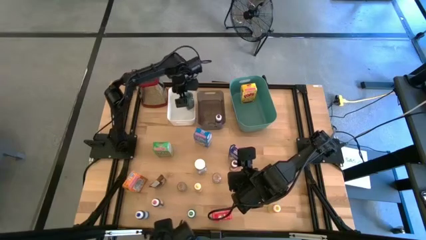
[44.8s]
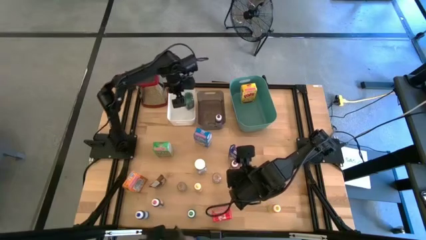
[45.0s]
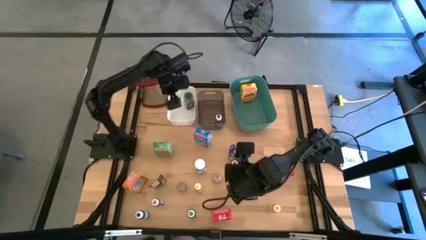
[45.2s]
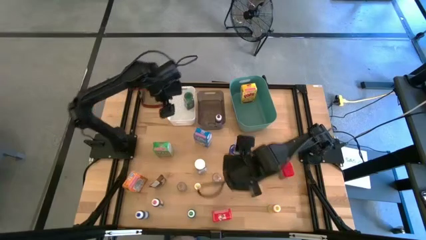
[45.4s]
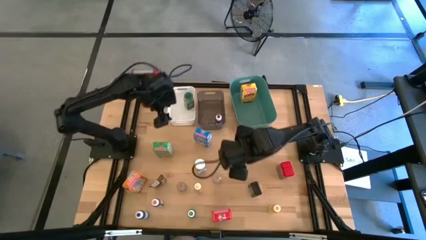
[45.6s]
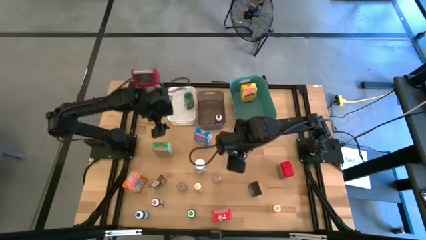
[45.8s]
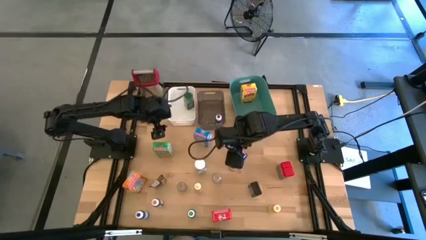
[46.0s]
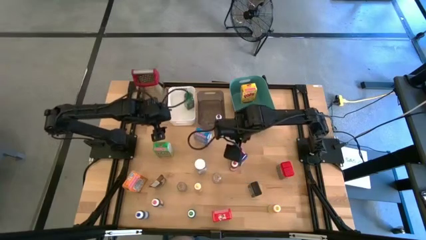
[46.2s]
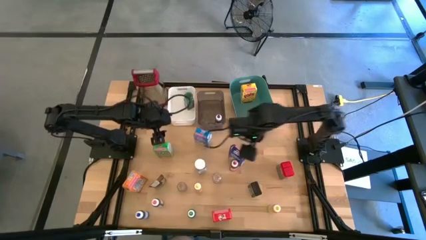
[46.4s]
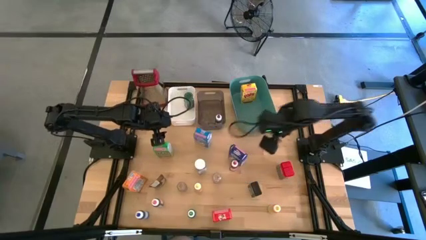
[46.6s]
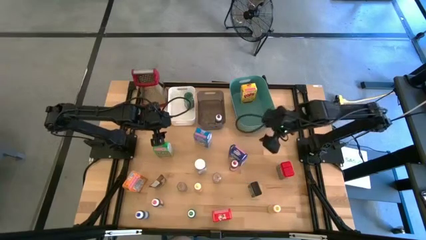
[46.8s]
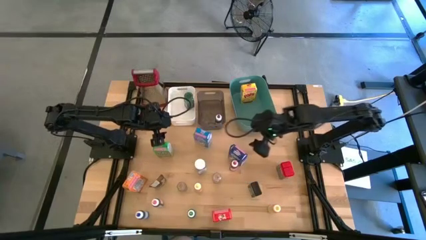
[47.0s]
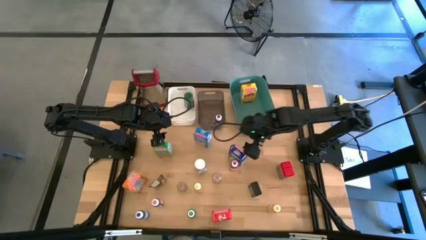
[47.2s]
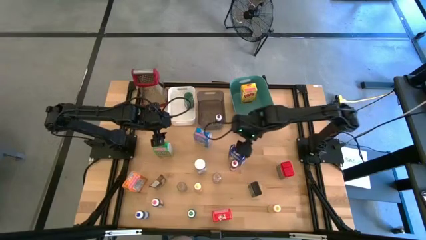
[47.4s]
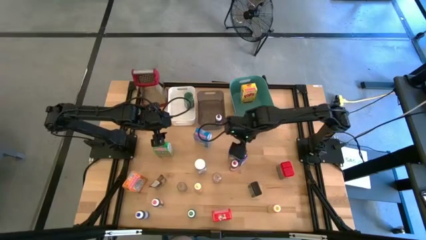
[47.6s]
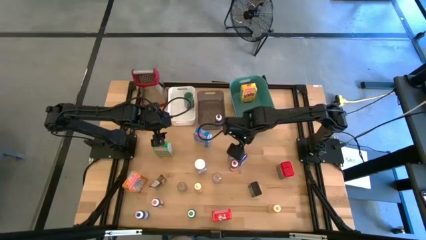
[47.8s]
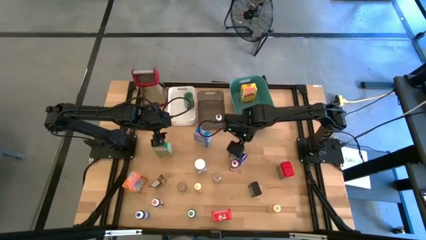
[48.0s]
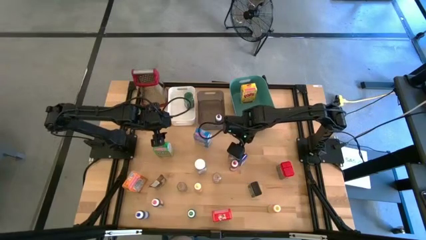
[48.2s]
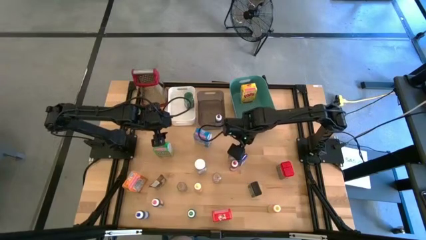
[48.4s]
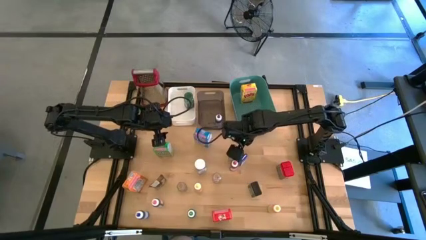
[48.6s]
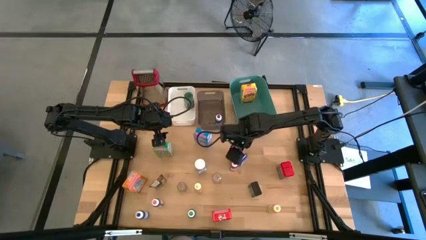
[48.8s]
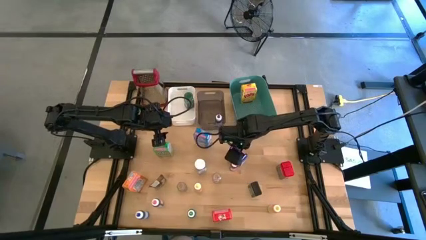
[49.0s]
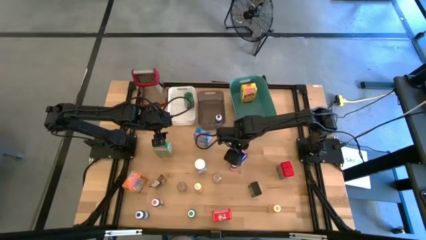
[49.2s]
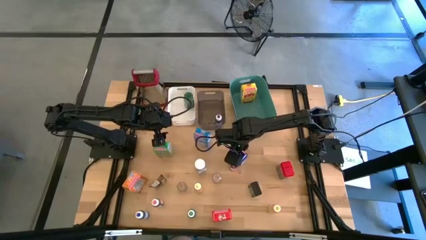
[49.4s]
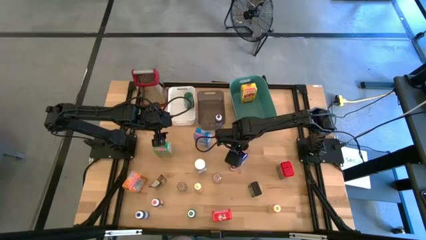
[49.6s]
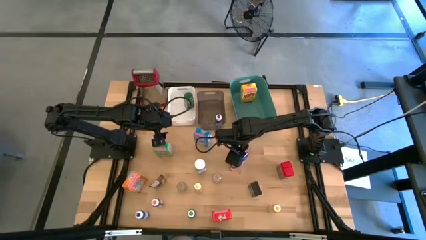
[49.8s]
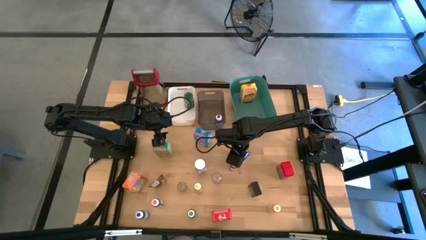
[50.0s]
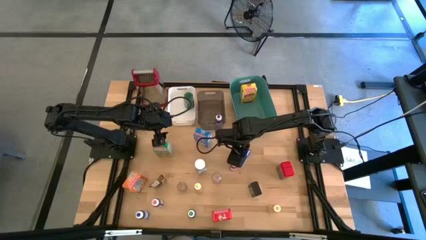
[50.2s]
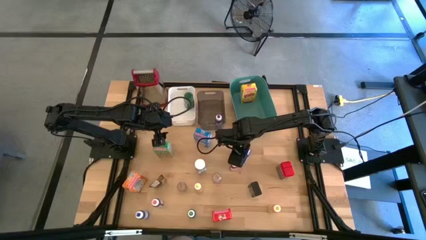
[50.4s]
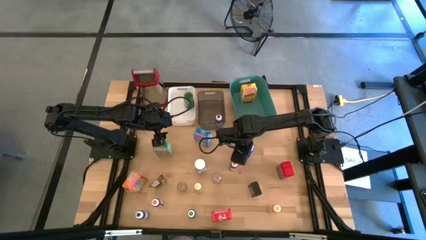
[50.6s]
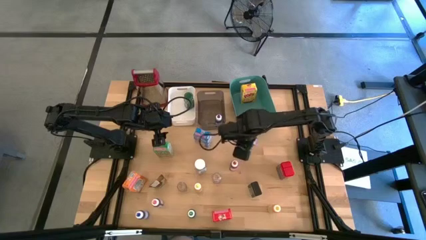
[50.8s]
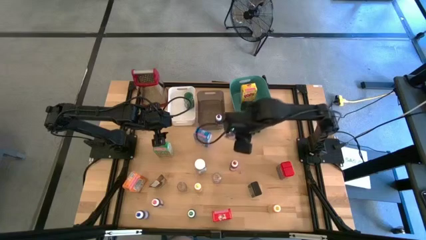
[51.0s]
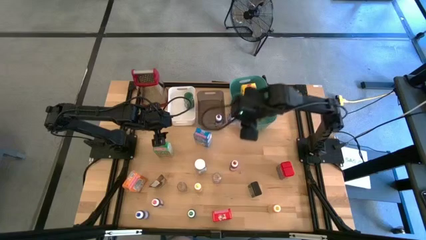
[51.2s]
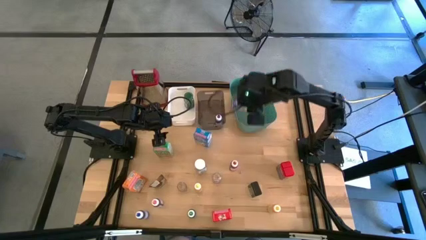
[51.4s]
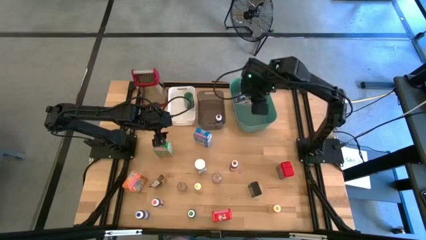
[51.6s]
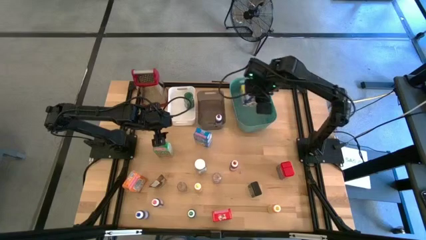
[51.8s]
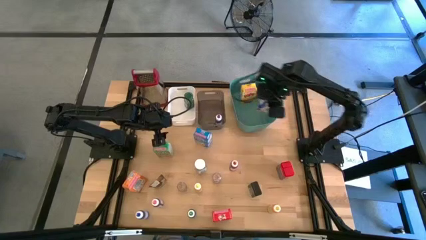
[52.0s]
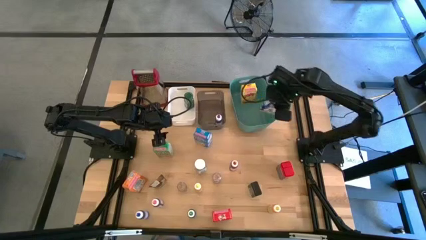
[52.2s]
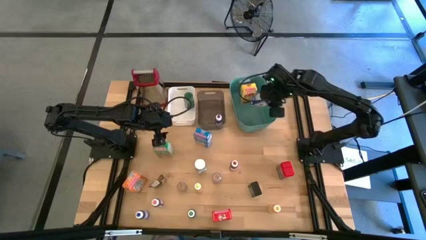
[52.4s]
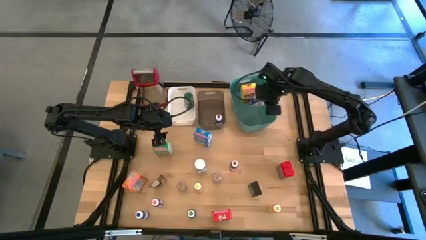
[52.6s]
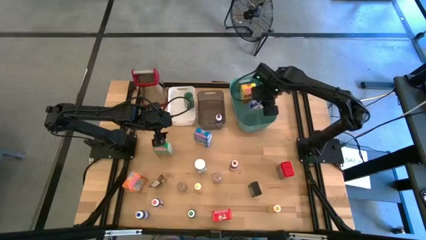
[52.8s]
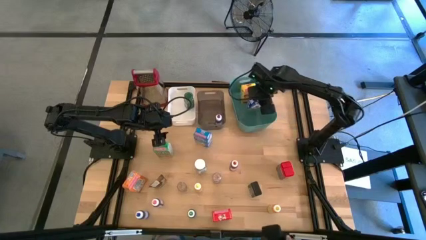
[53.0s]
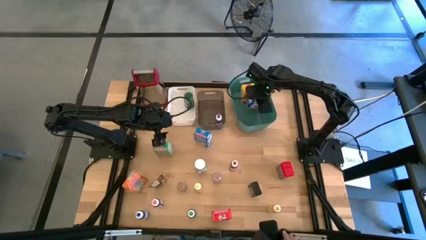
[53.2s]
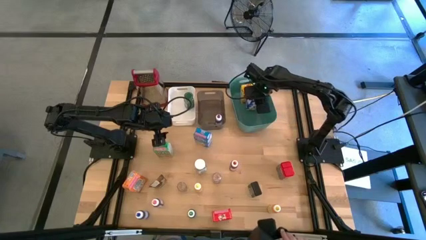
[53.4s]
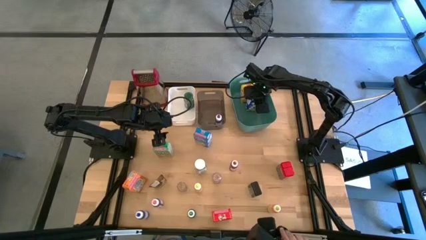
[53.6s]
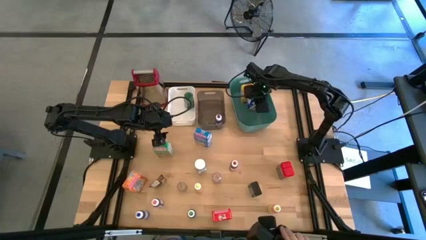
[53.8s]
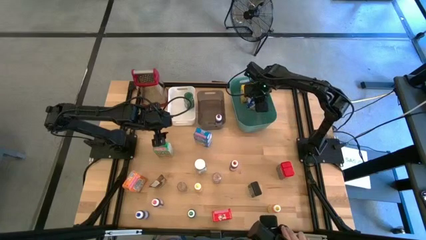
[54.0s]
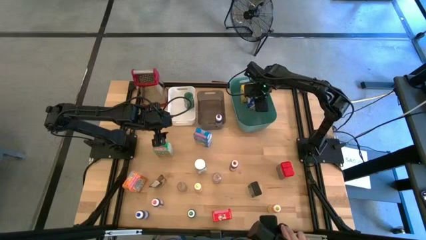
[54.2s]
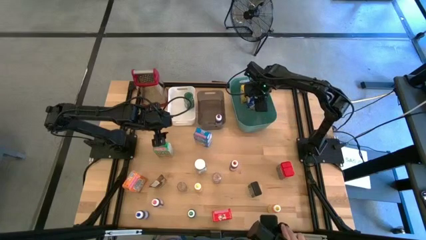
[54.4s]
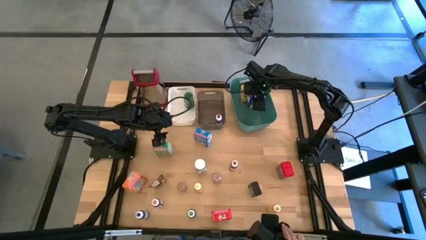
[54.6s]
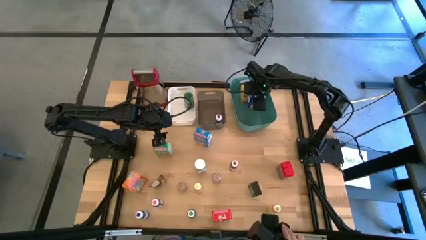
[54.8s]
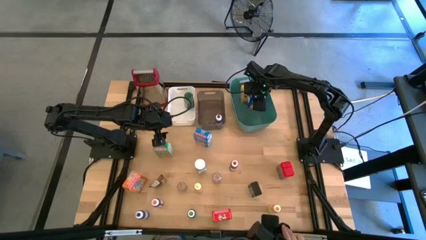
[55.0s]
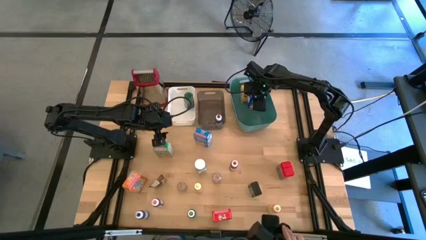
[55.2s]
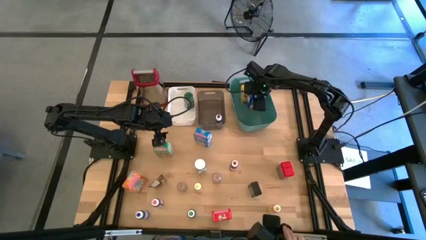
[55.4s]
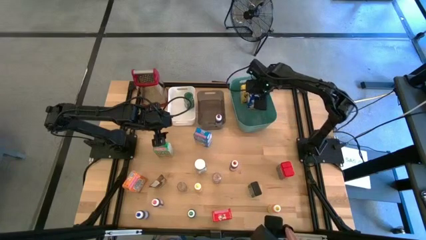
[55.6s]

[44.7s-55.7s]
Task: Pick & Place Kitchen Items
Put the dark blue cereal box into the right green bin

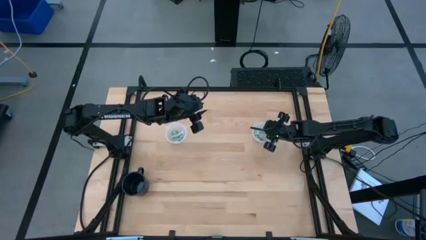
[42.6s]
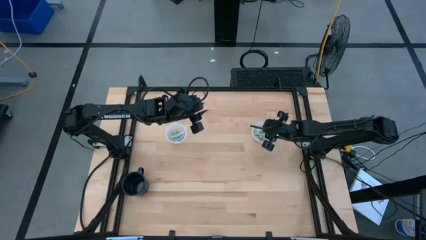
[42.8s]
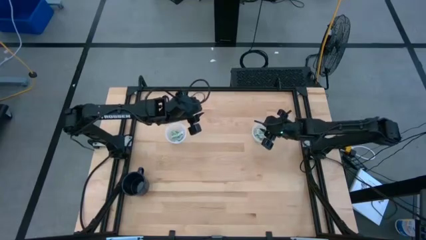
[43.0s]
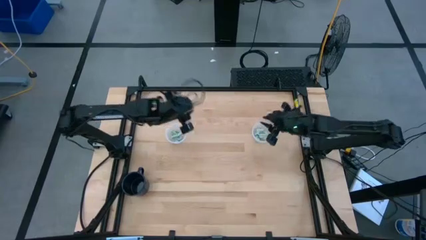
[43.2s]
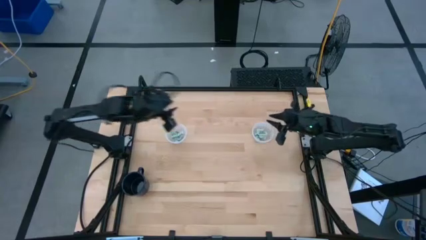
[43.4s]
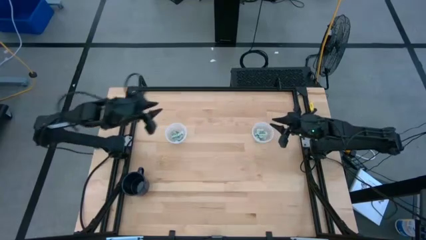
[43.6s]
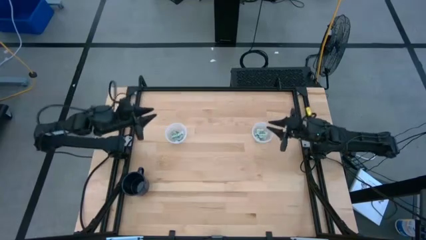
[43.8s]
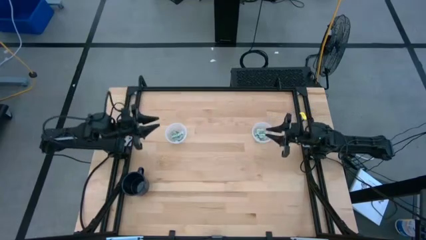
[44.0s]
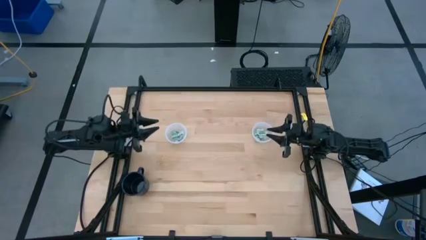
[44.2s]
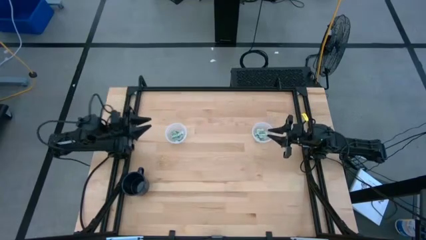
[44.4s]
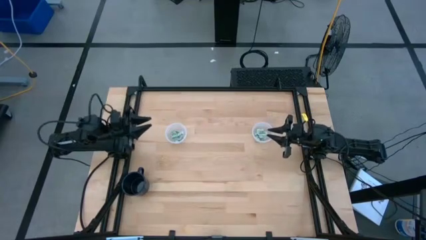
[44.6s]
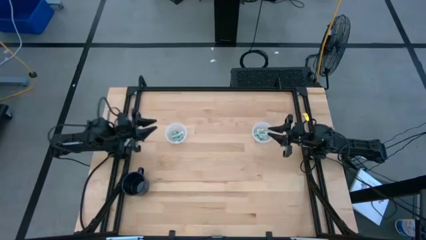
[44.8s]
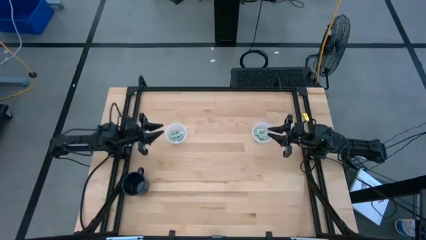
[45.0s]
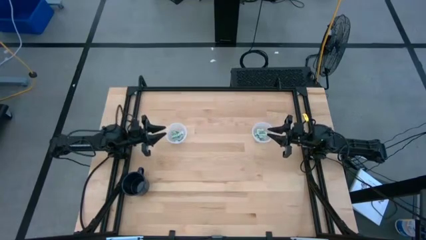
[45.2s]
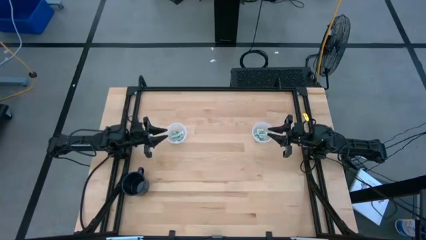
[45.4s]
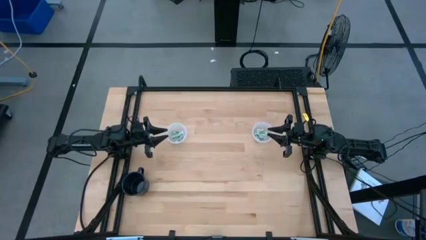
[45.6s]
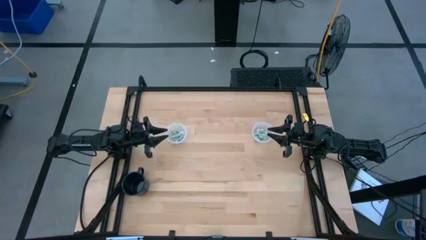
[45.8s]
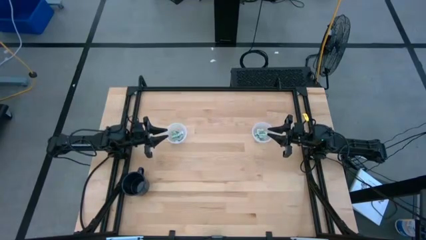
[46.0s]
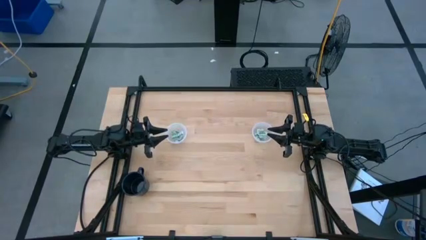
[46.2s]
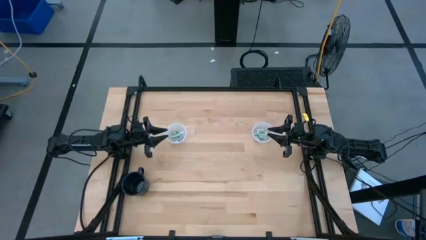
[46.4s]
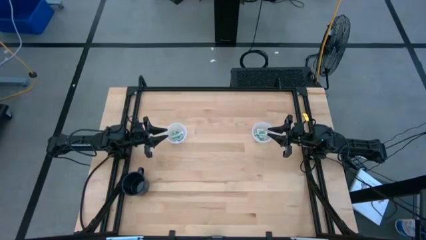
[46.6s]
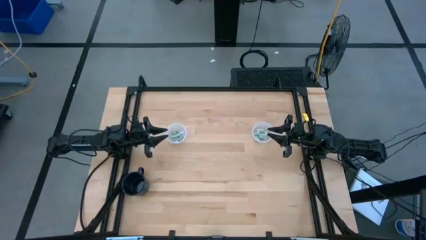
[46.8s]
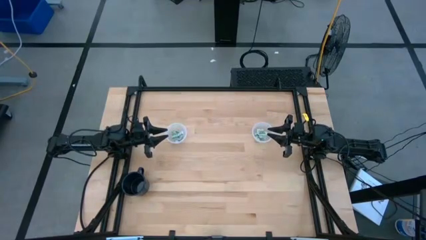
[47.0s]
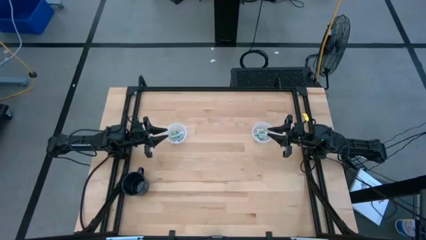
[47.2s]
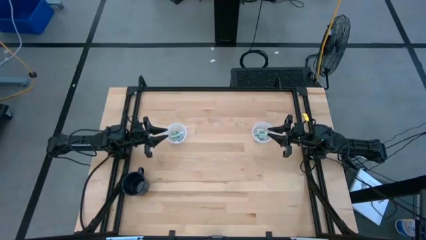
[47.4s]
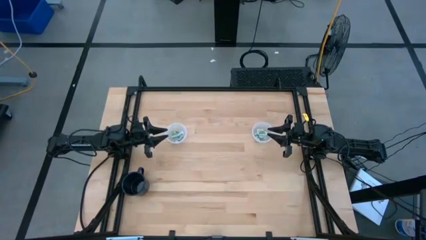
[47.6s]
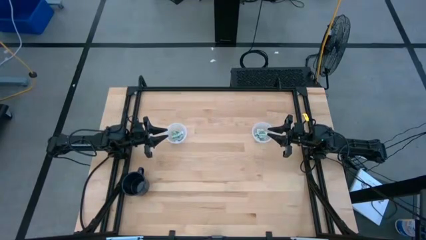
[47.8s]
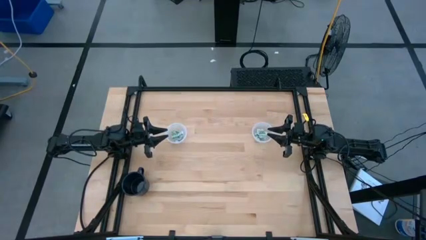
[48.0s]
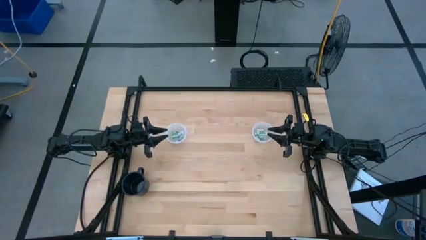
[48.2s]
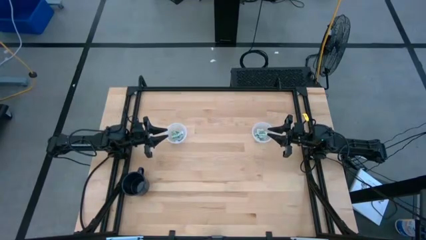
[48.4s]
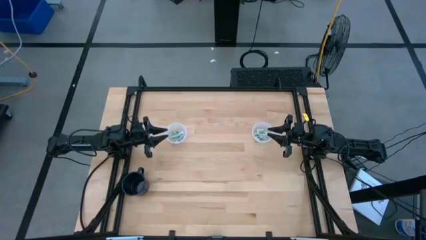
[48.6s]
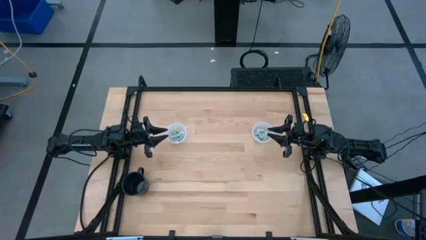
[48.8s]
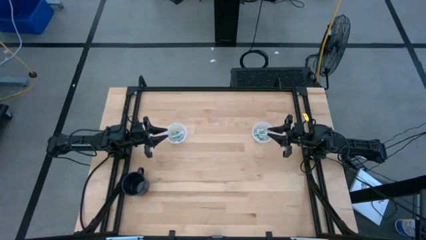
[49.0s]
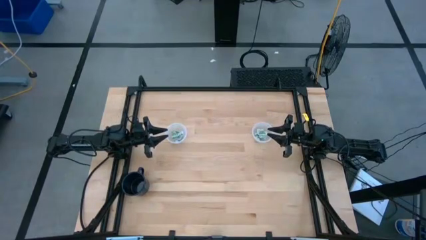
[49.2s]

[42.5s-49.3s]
Task: Pick and place Stevia / Truvia into bins
Return to Home Position
